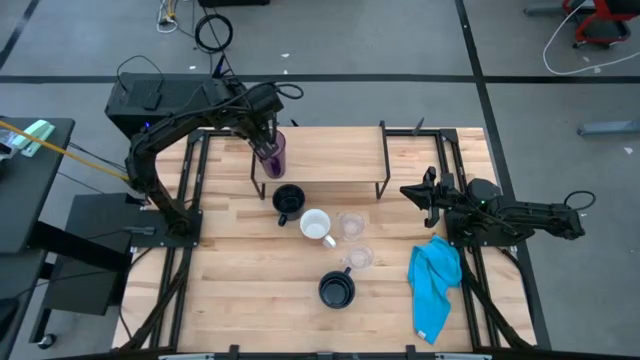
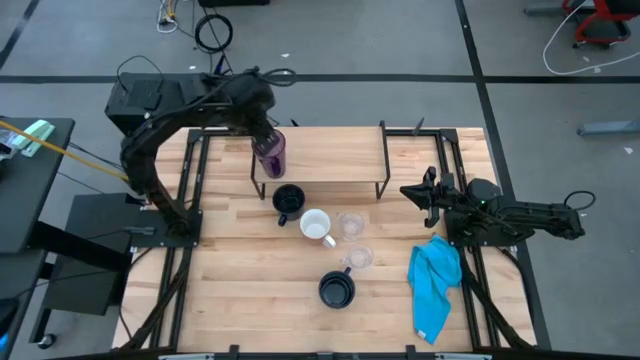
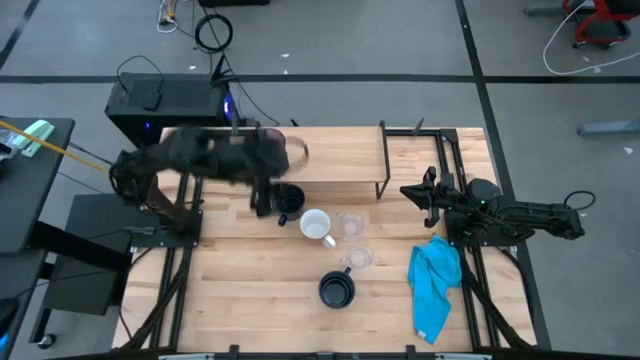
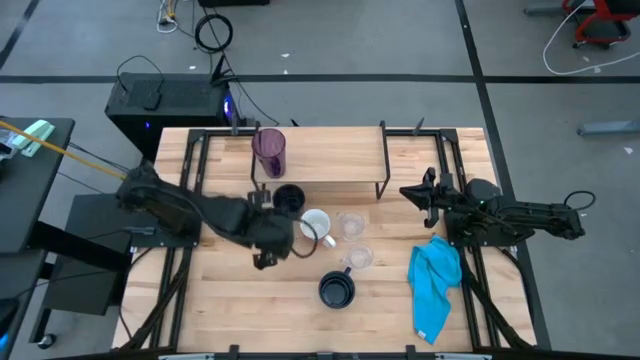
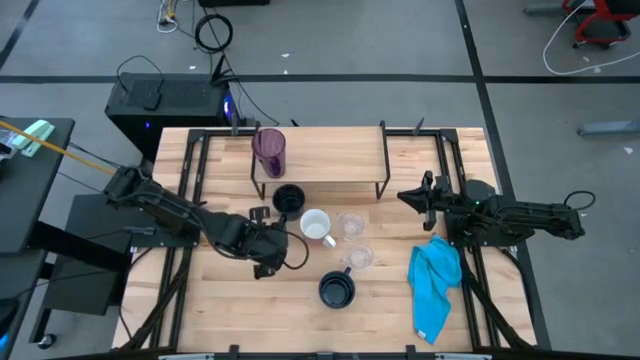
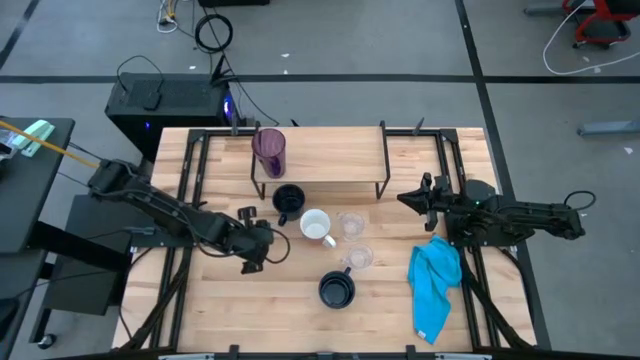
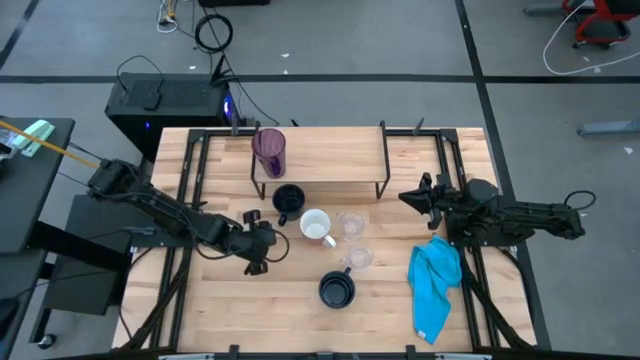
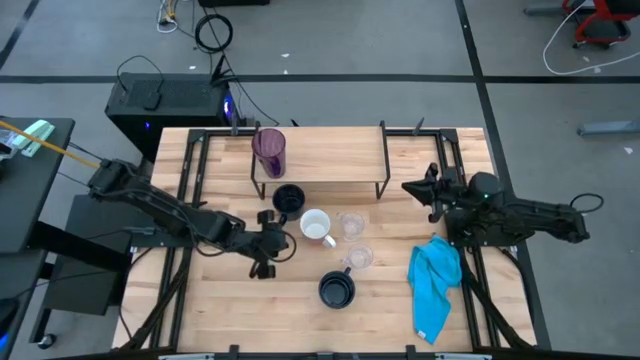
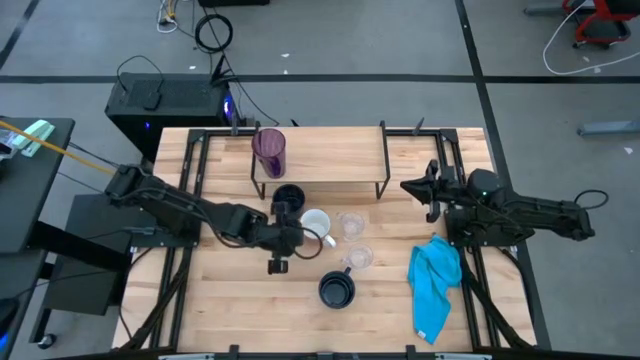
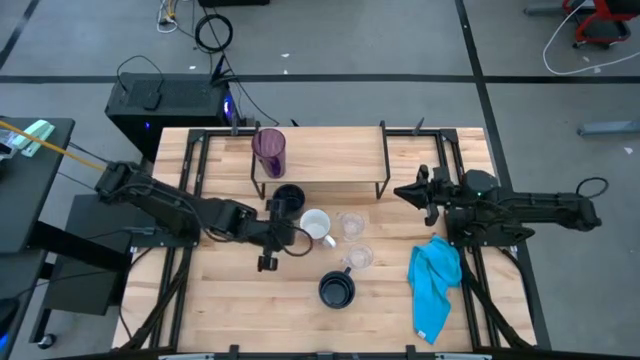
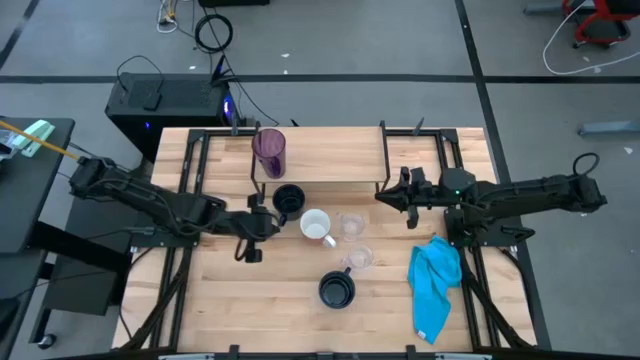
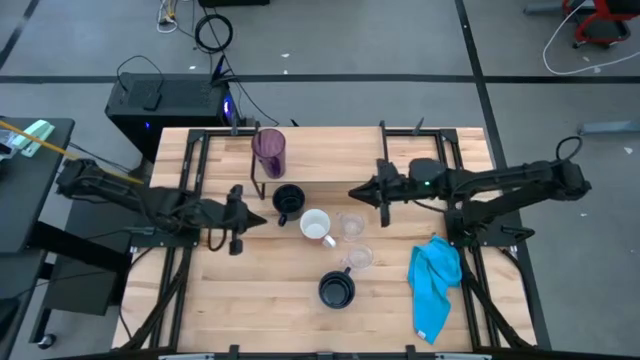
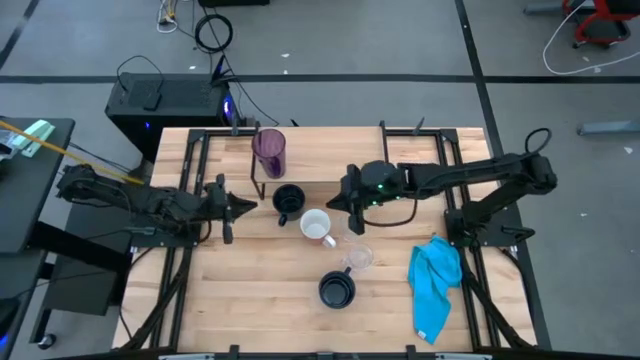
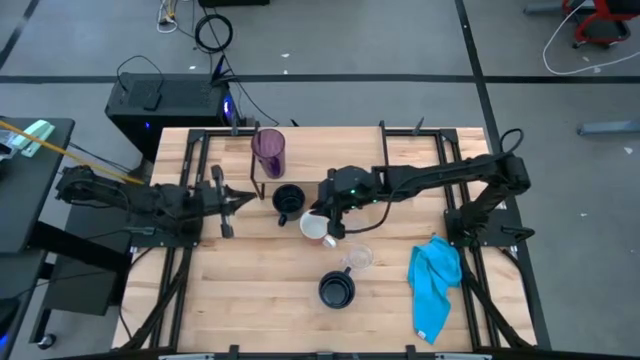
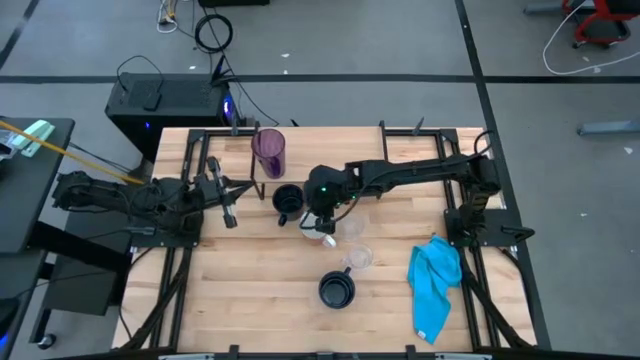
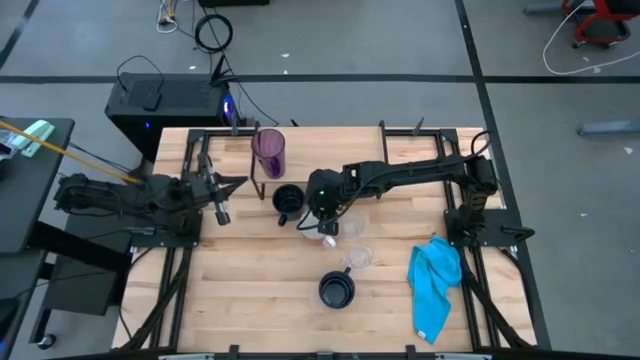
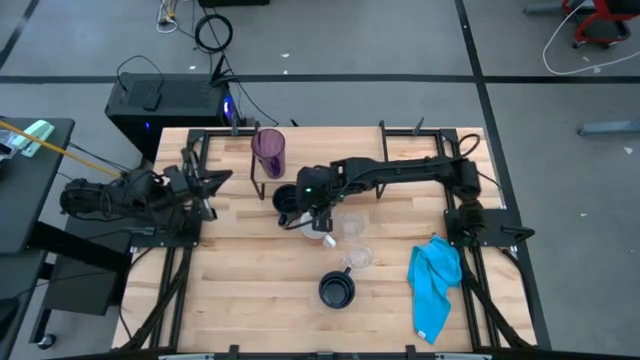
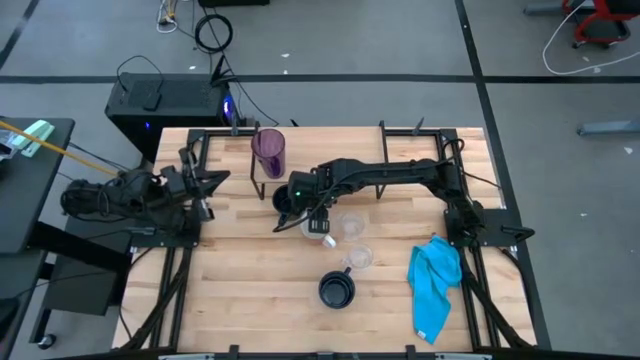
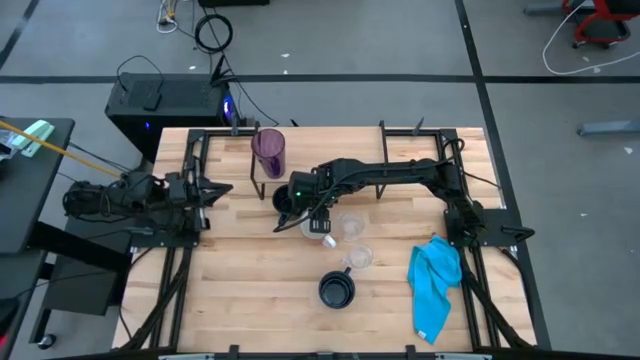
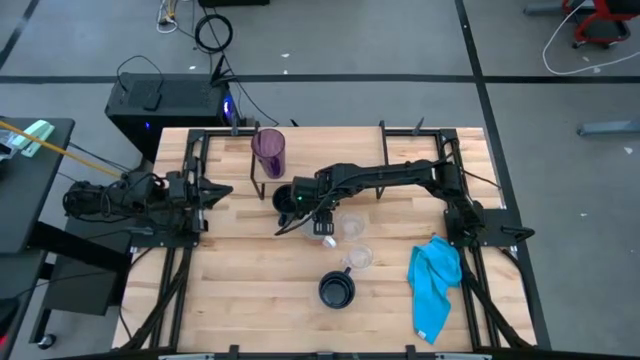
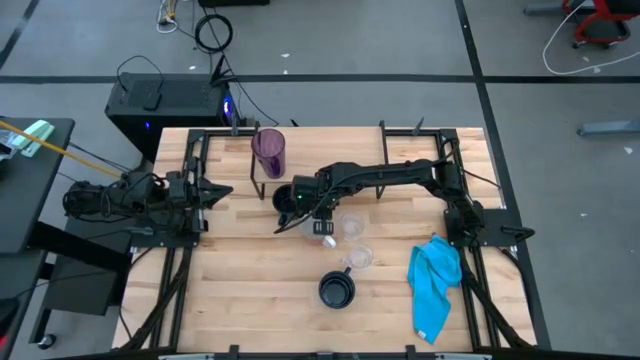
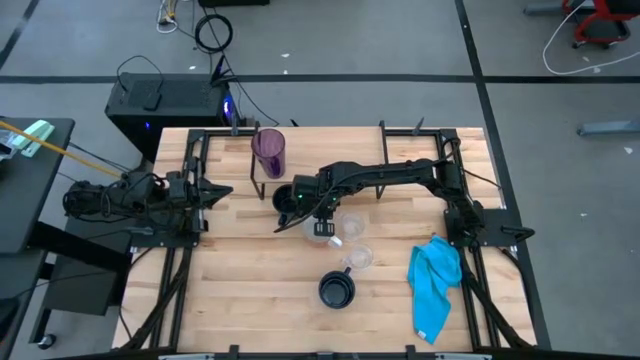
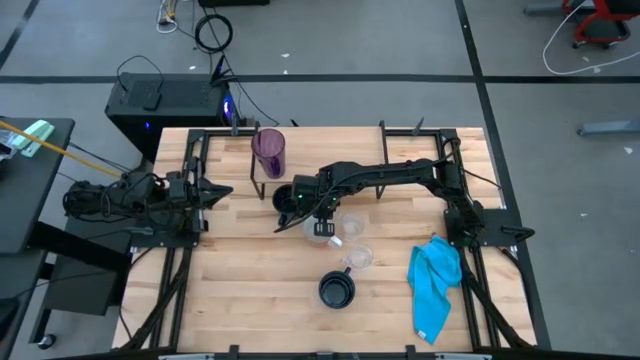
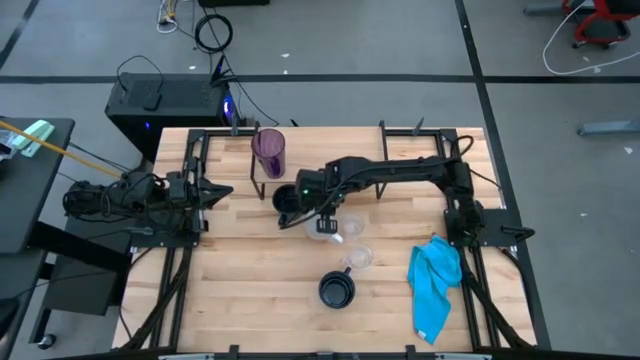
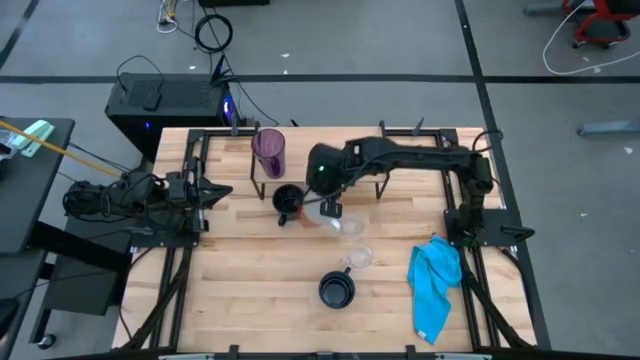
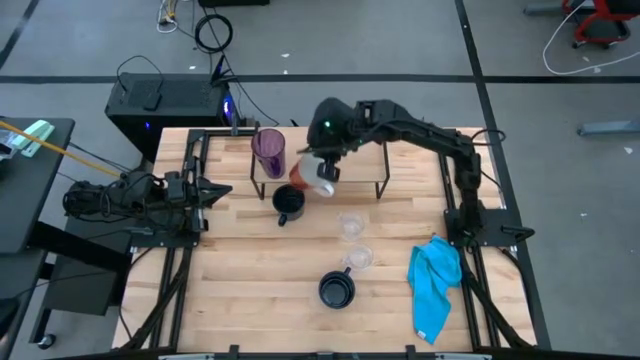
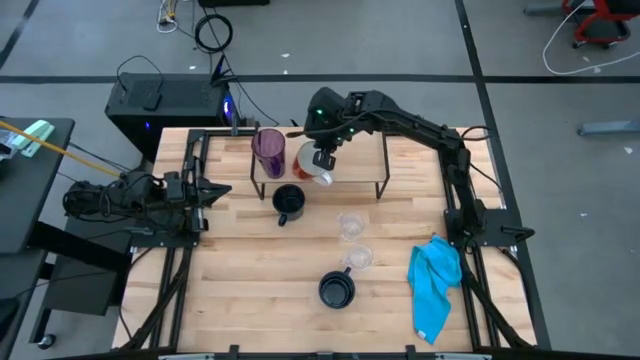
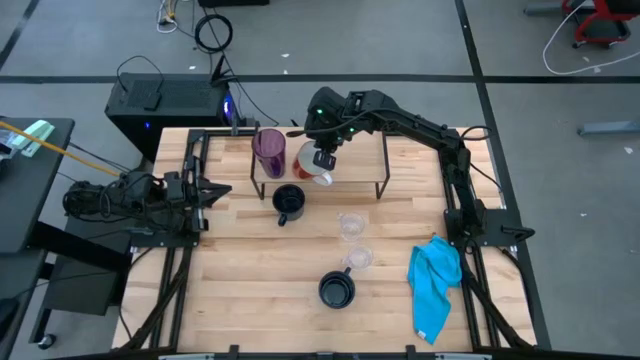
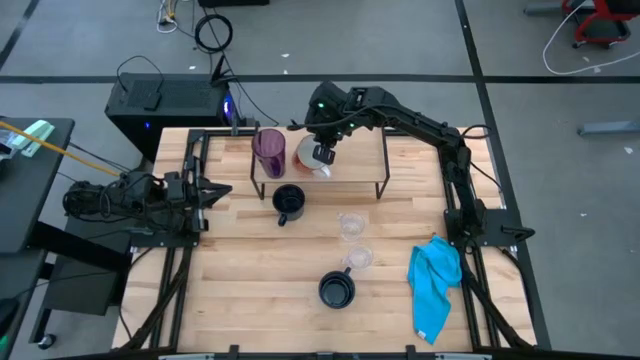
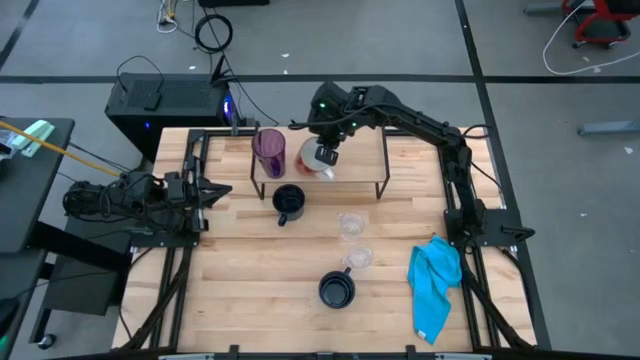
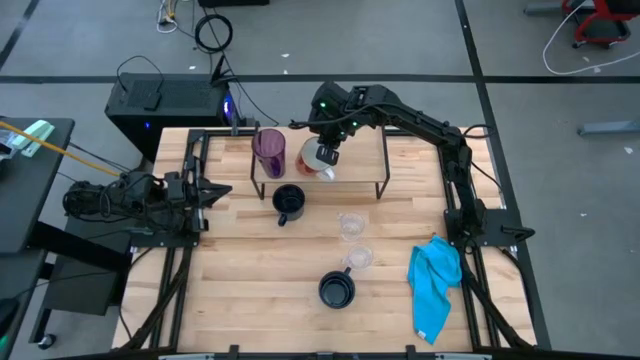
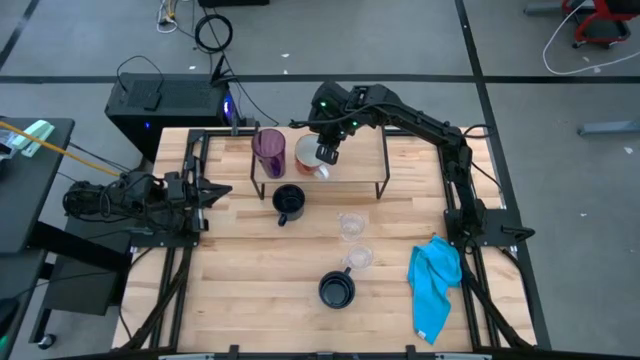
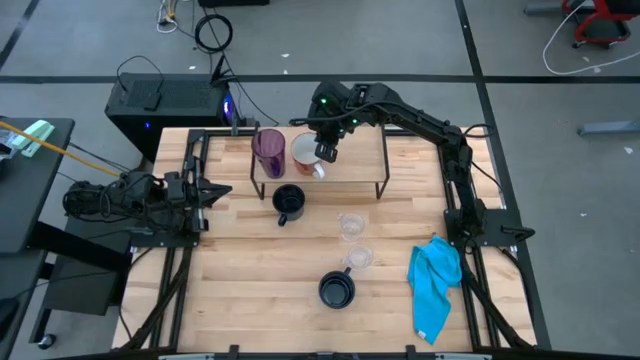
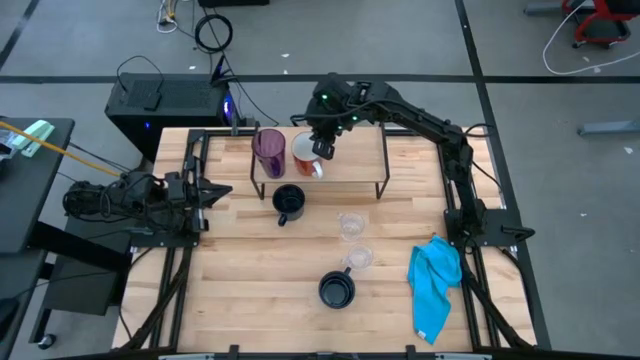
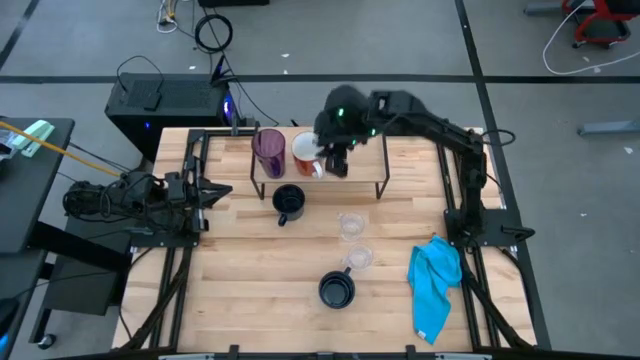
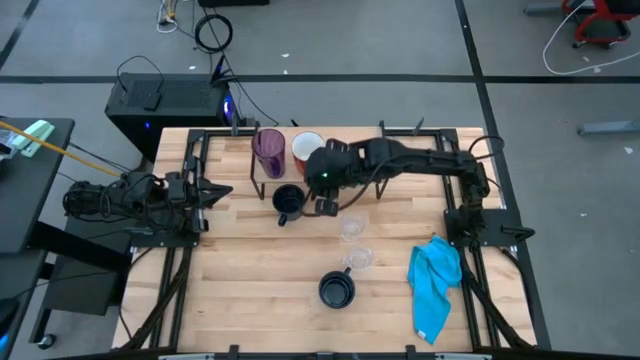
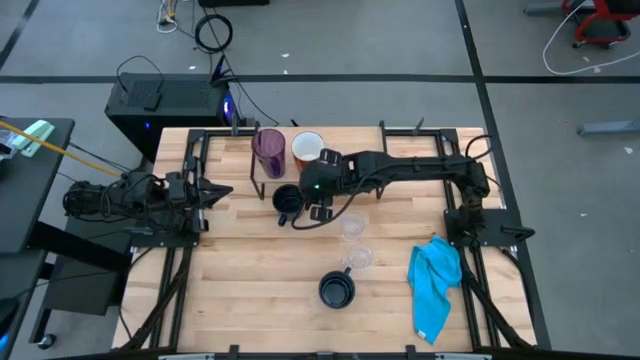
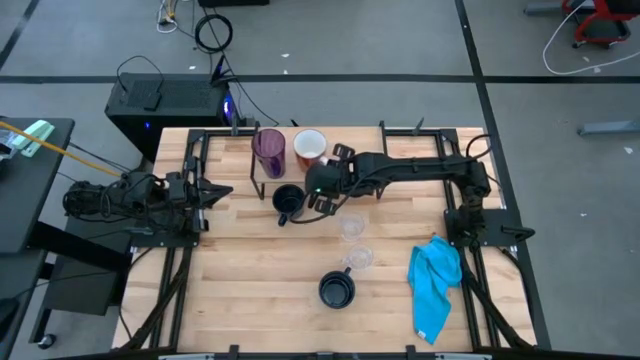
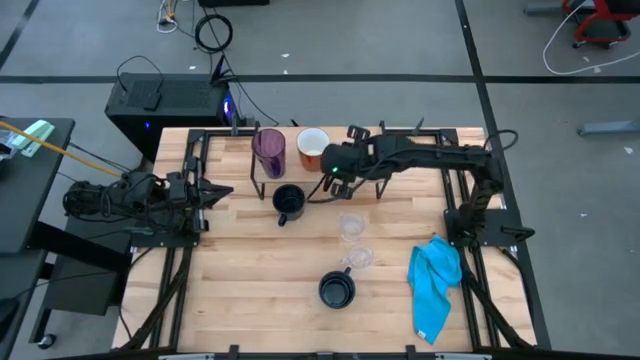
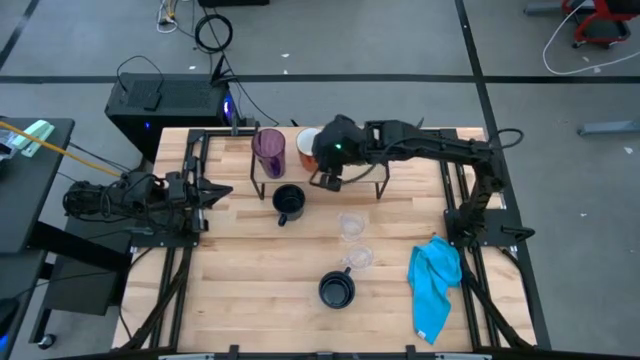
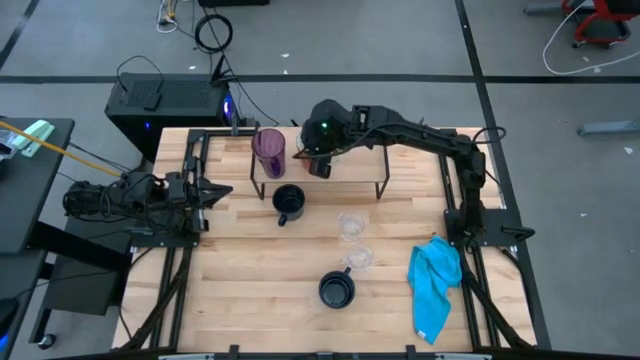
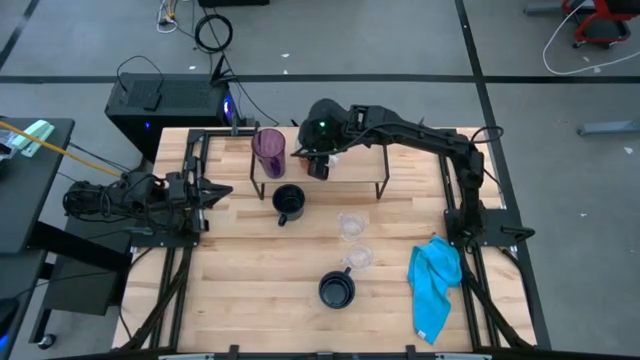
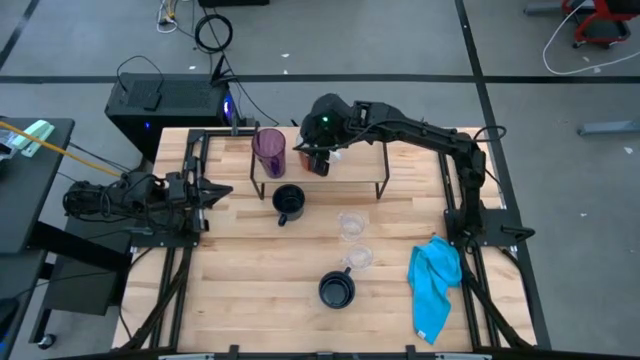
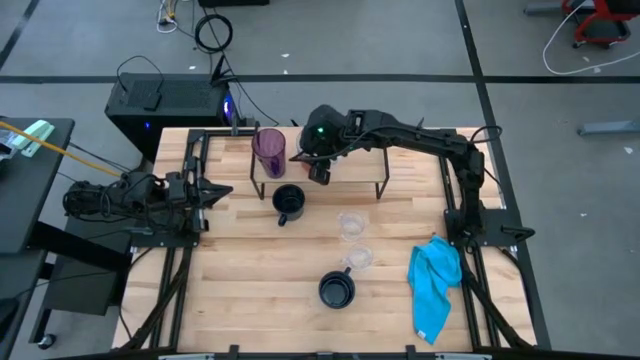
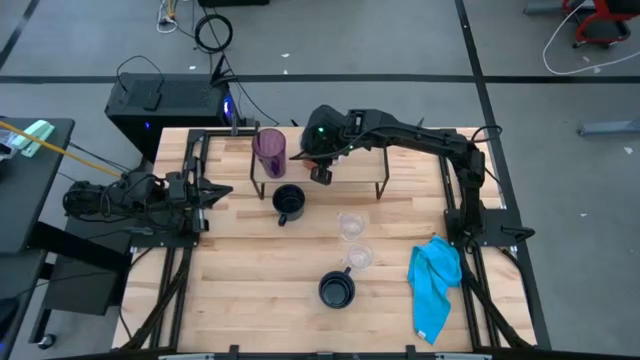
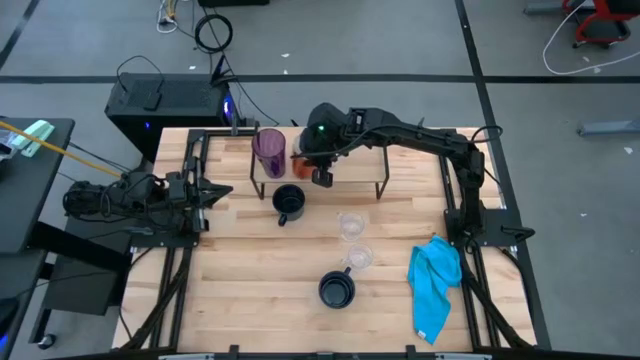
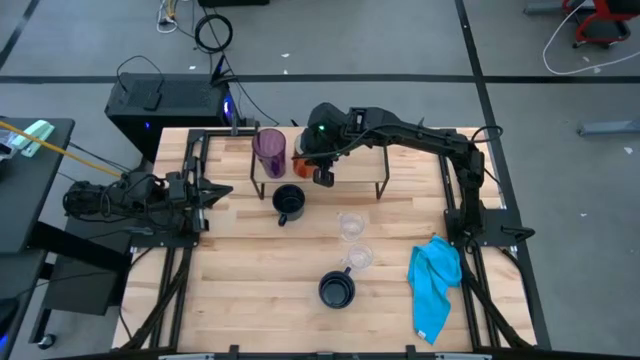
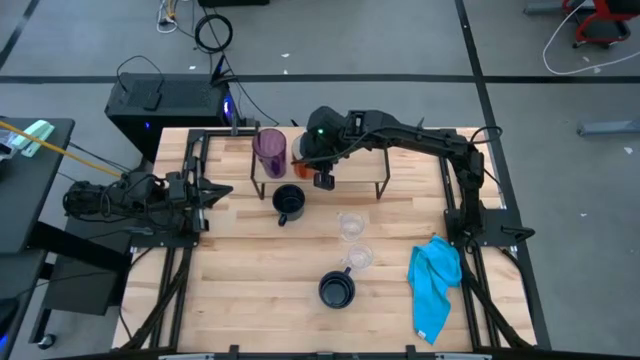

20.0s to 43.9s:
Task: Stack small to large cups/mugs on shelf
Put the orange mug on the shelf
